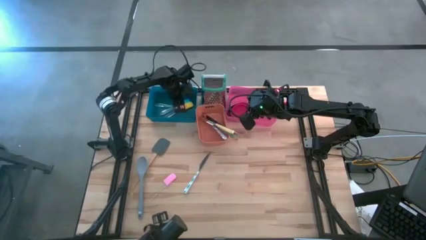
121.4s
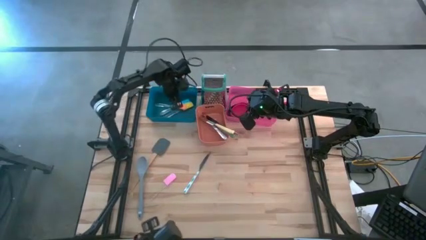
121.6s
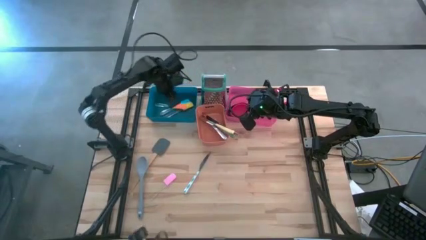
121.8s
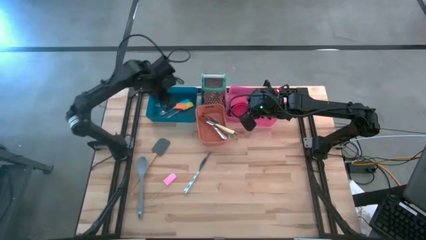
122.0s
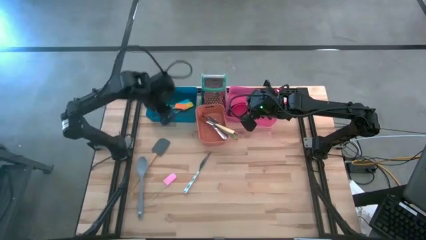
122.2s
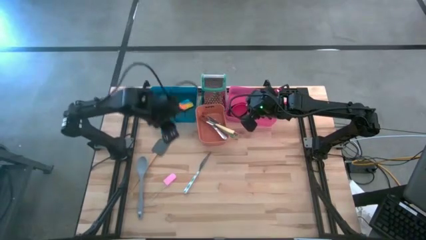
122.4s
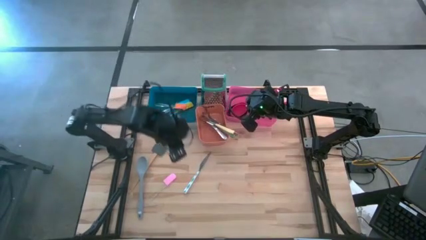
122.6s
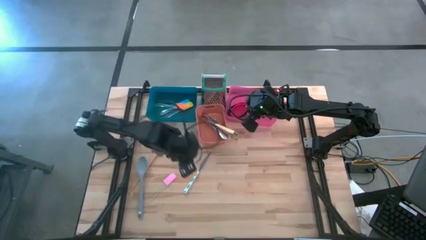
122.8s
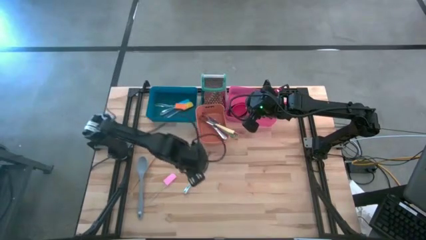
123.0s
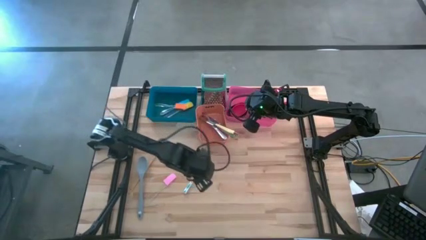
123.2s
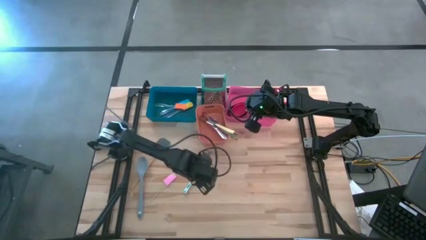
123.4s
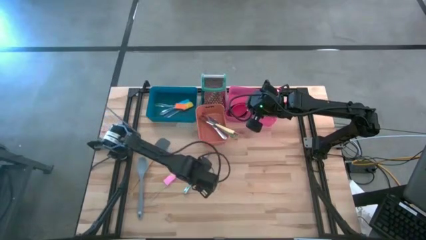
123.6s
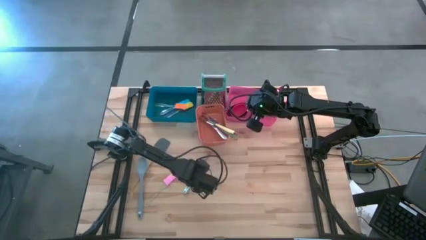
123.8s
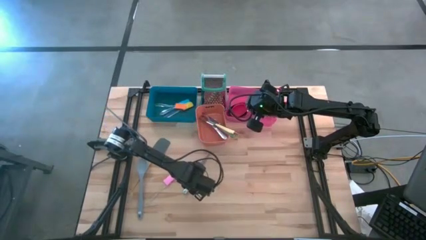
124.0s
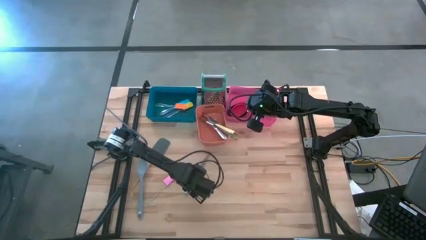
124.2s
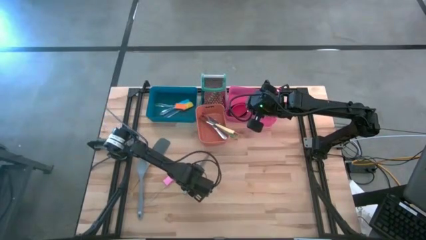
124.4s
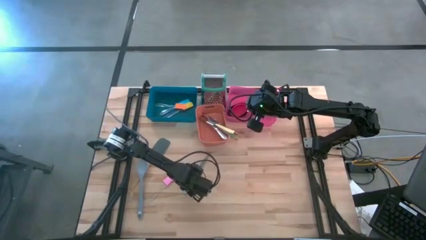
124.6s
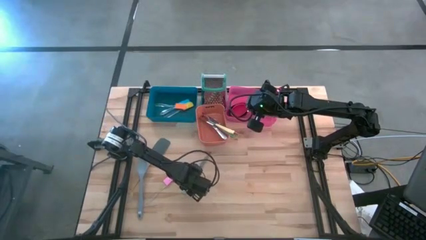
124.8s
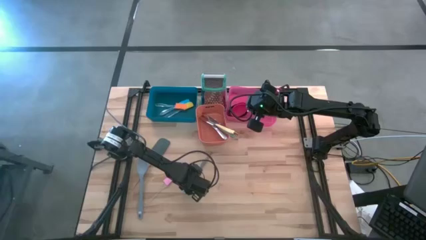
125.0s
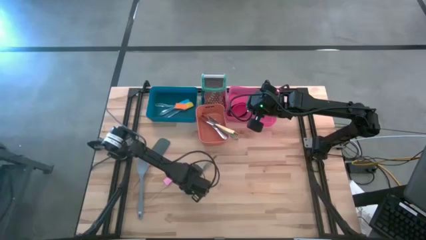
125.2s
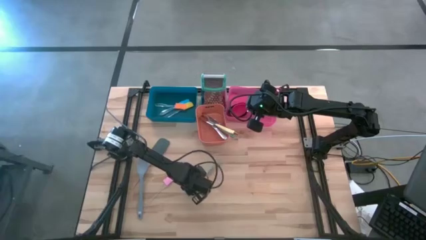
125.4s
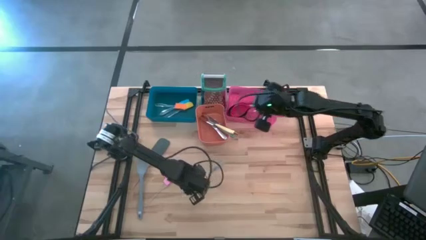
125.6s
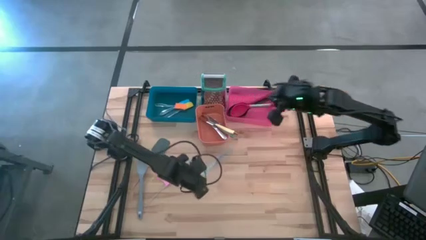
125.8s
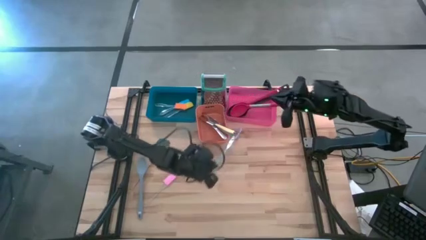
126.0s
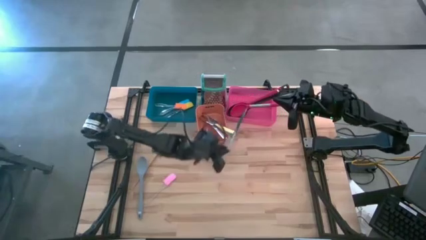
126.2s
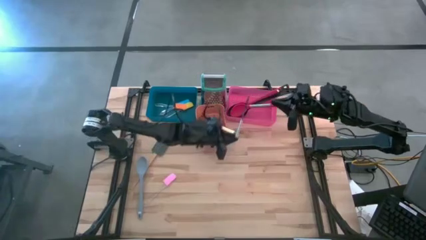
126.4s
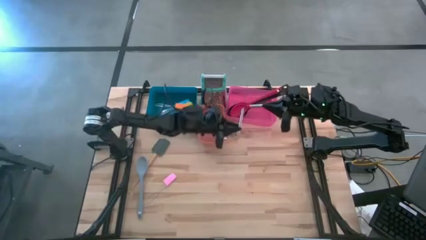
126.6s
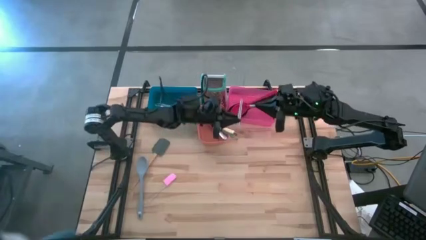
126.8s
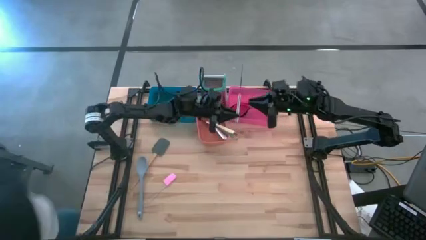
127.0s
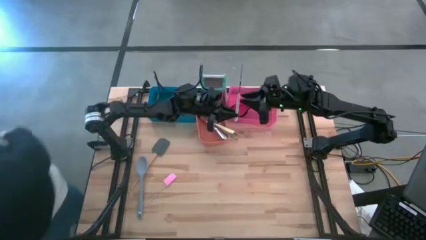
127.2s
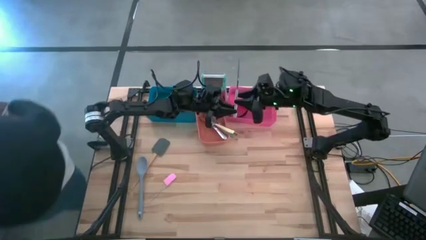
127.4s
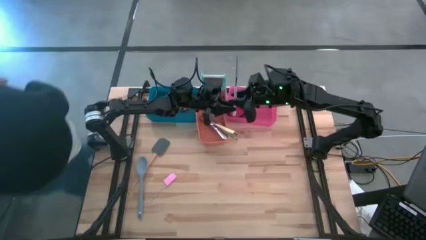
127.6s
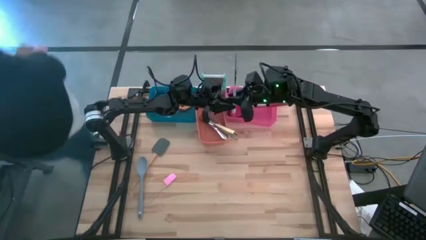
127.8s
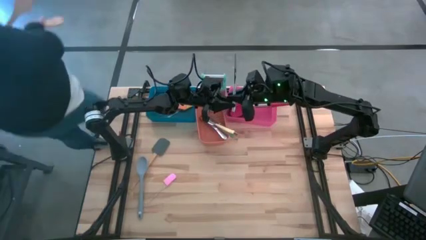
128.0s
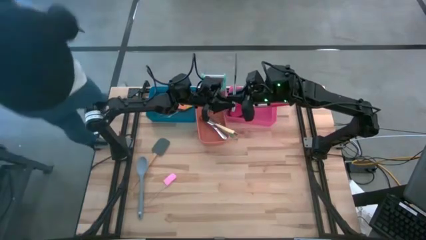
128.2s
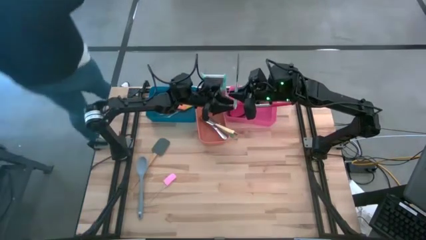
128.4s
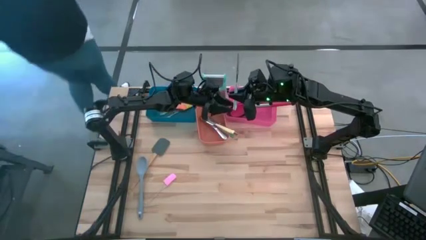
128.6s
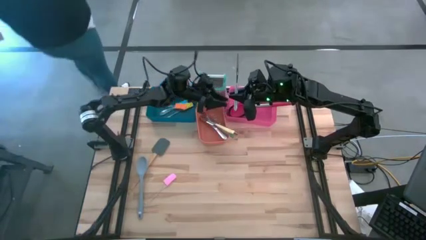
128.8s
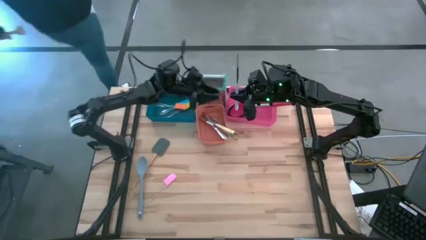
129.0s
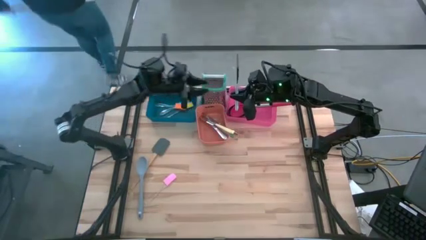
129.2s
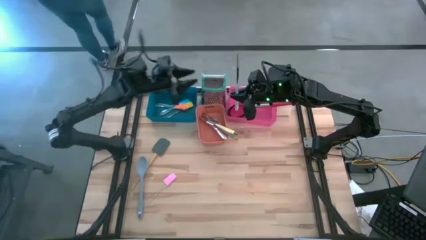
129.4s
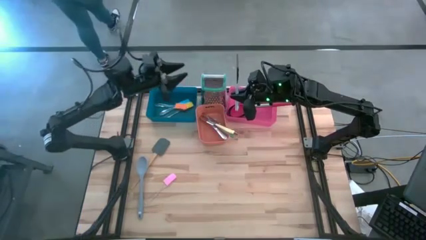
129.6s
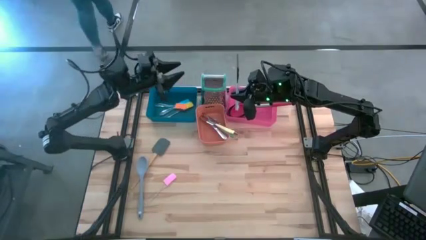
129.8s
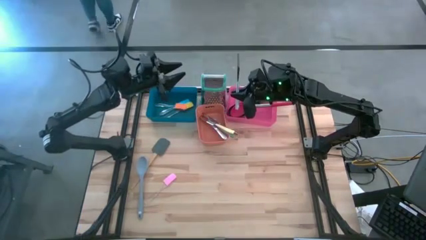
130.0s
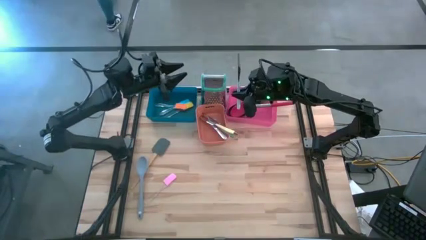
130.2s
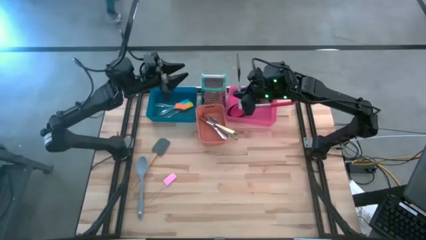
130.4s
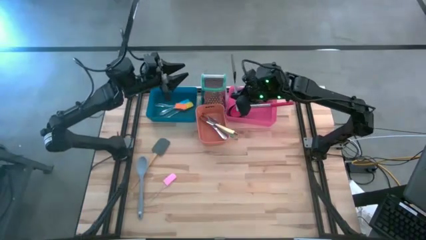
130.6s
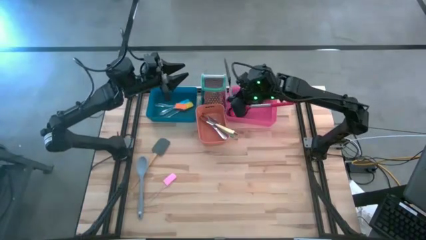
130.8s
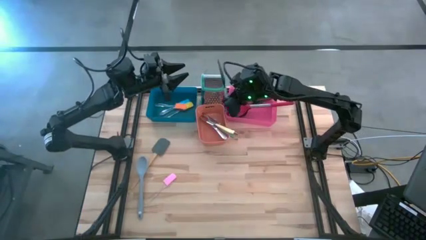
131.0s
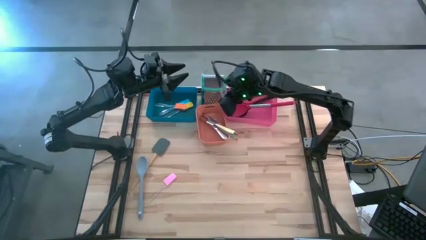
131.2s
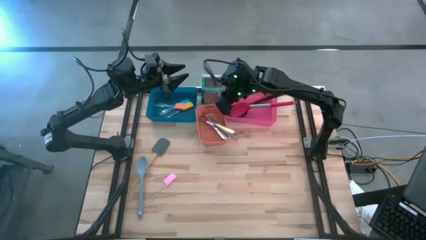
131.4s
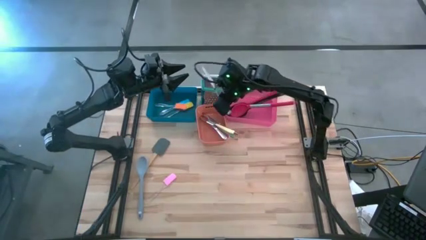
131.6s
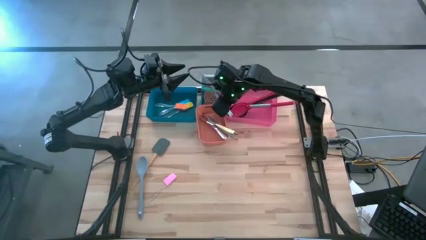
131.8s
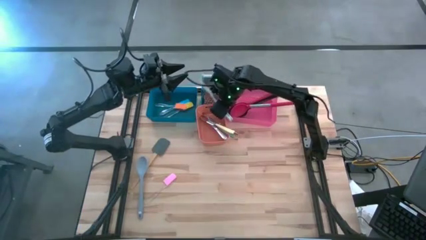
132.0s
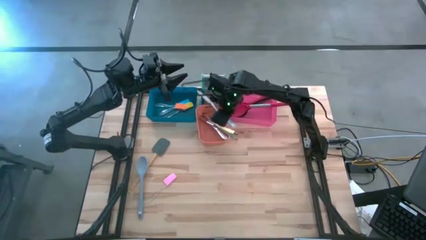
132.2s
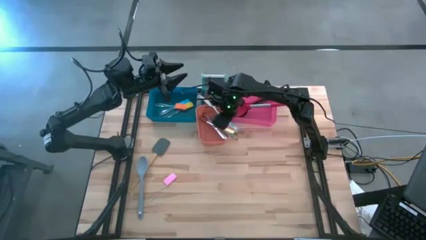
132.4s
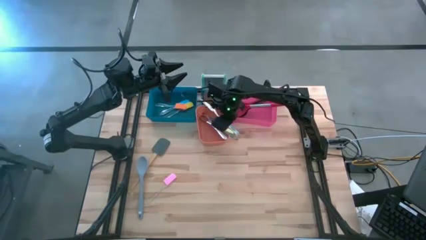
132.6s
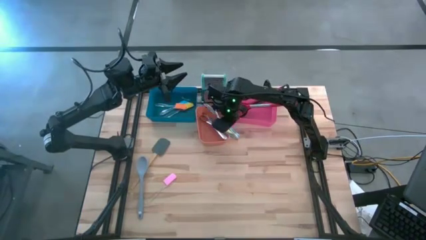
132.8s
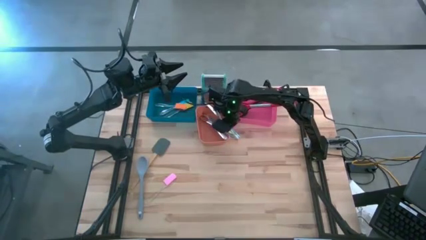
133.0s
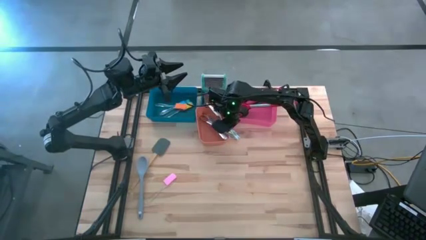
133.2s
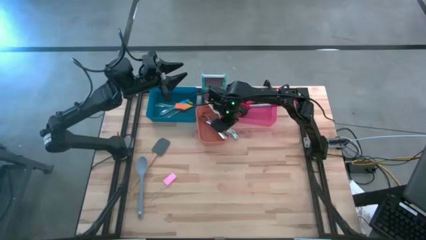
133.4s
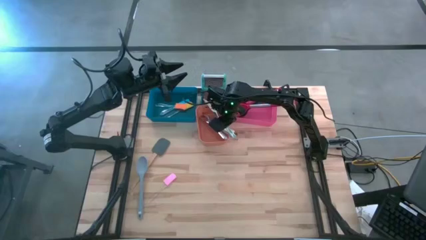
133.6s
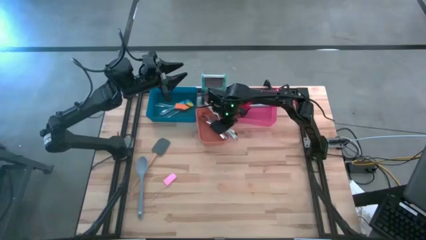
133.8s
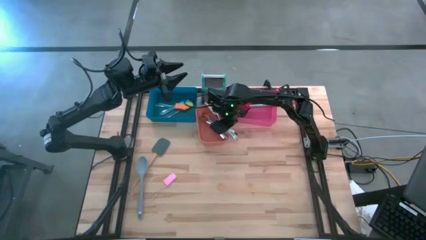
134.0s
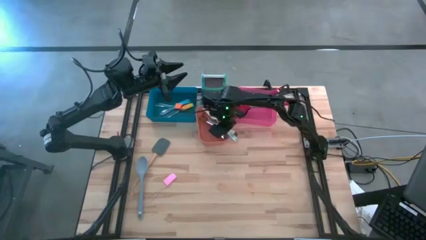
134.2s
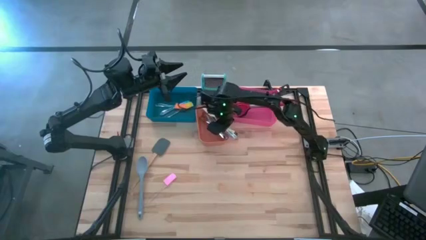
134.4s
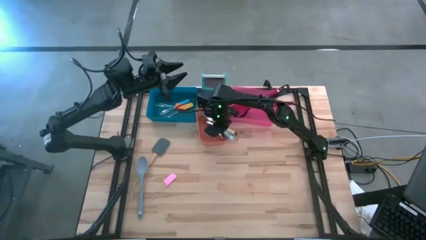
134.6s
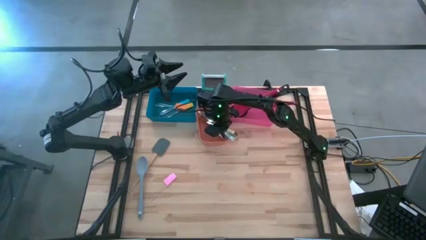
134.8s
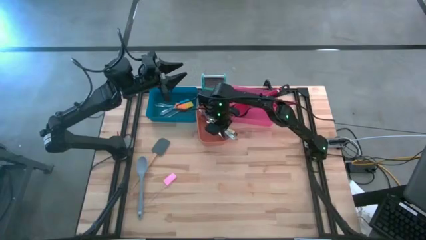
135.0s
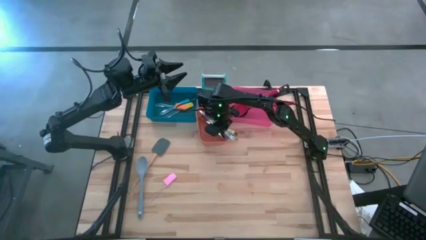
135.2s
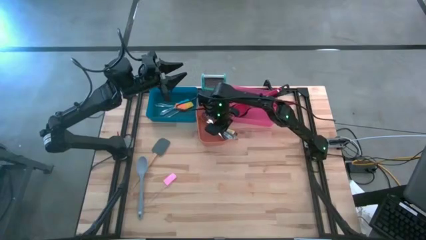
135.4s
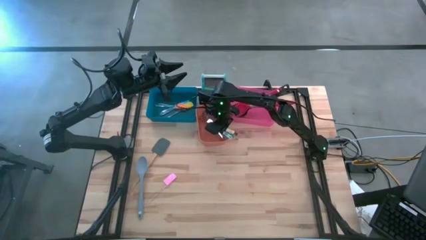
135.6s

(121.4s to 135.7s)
Task: Pick & Place Kitchen Items
Put the blue table knife into the blue bin
